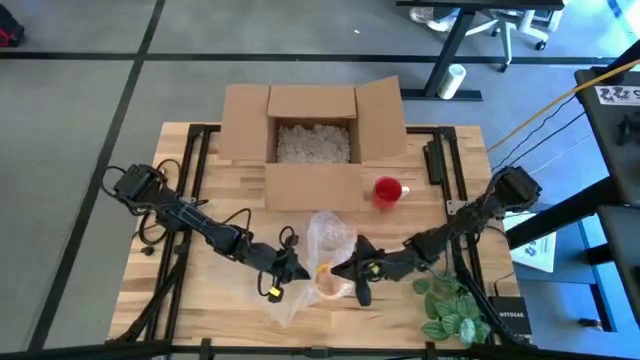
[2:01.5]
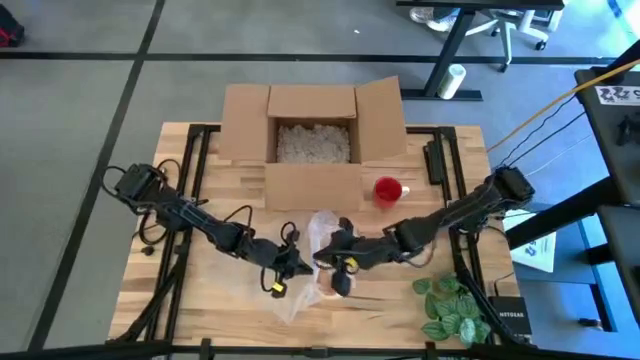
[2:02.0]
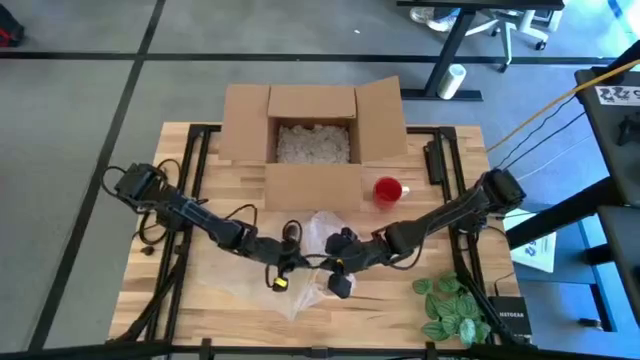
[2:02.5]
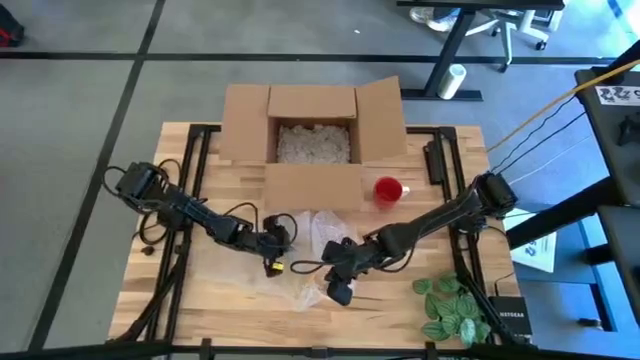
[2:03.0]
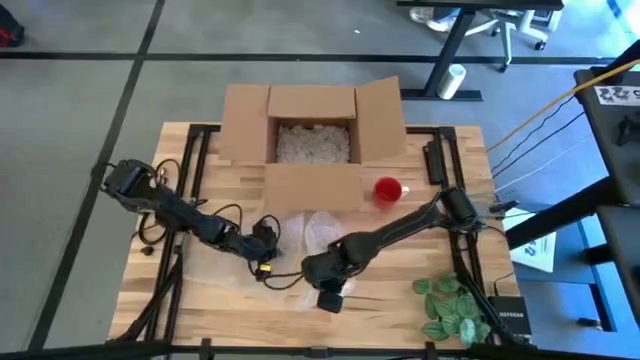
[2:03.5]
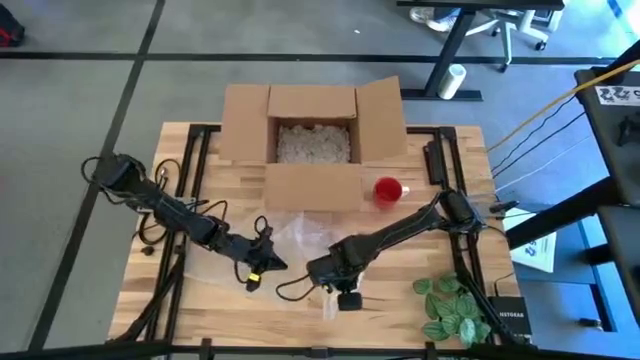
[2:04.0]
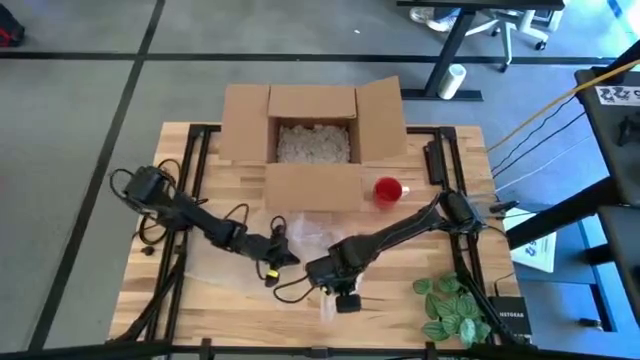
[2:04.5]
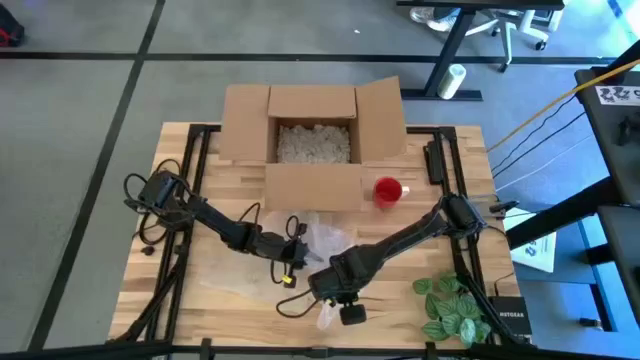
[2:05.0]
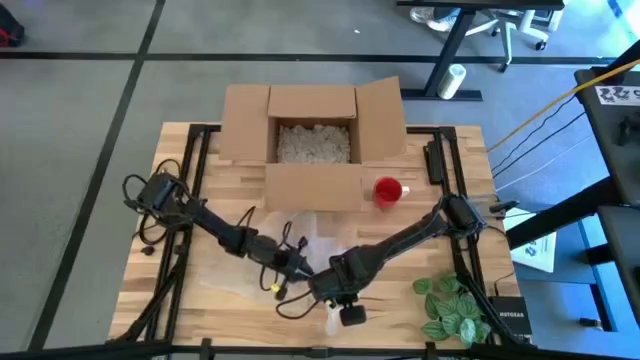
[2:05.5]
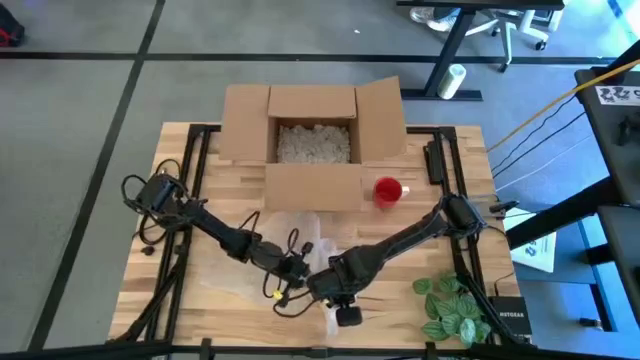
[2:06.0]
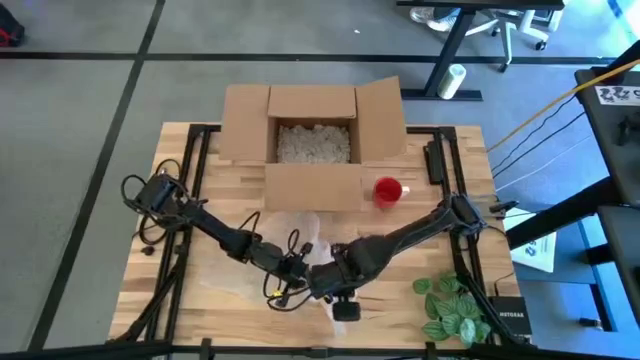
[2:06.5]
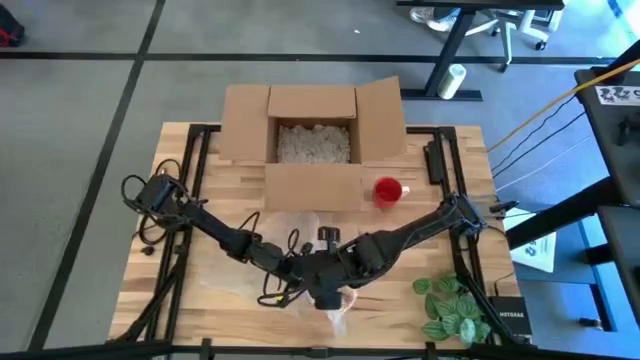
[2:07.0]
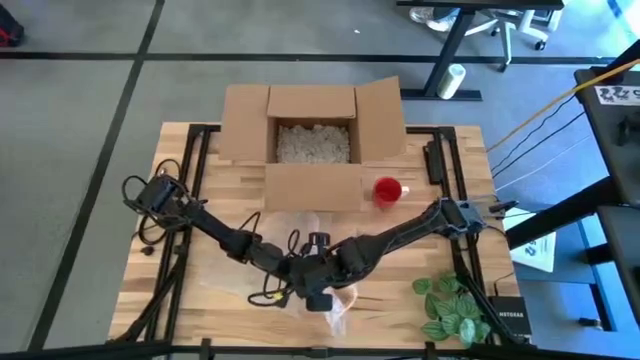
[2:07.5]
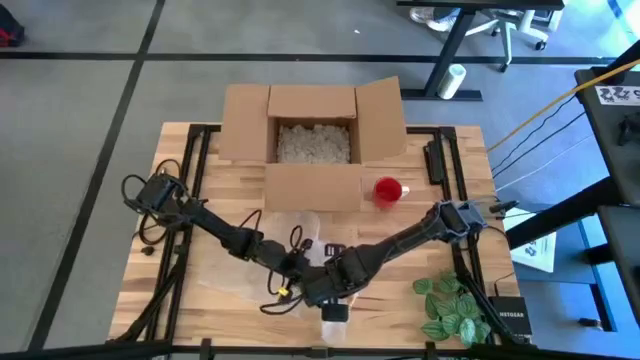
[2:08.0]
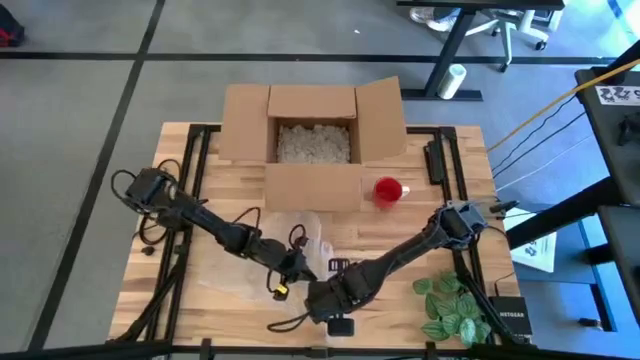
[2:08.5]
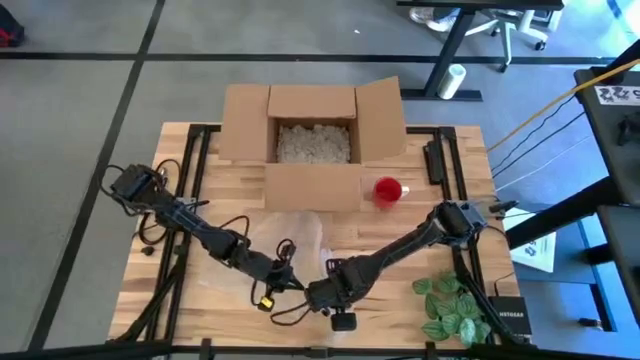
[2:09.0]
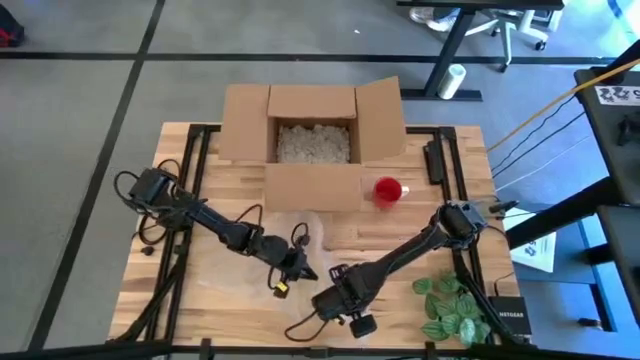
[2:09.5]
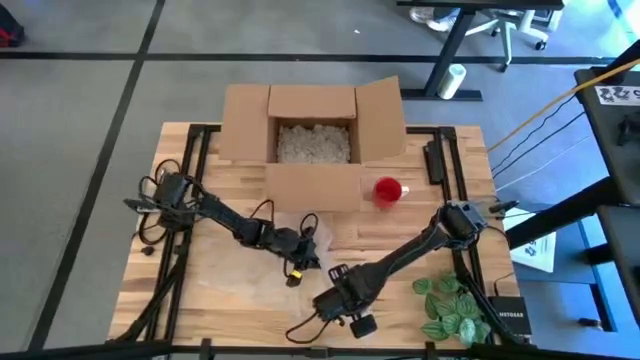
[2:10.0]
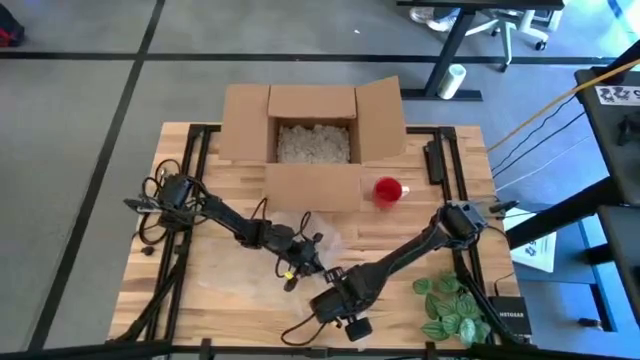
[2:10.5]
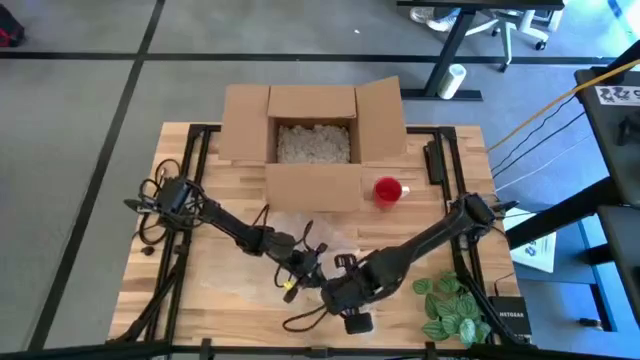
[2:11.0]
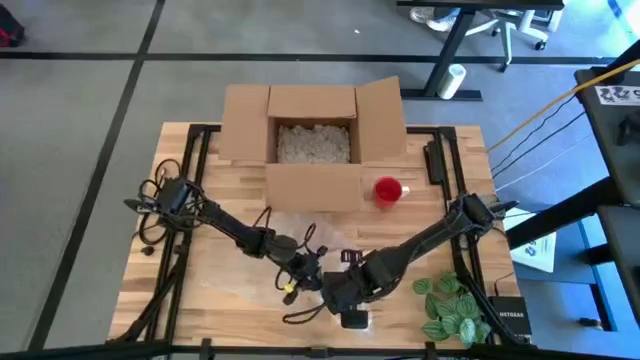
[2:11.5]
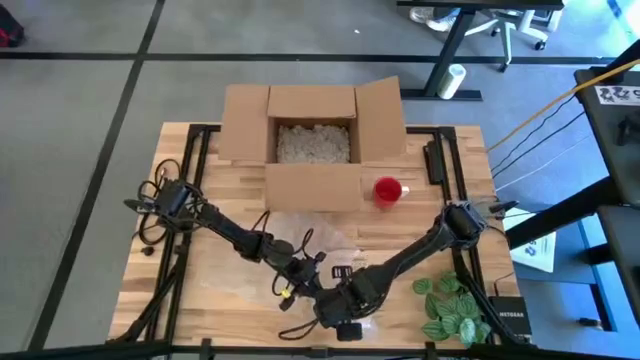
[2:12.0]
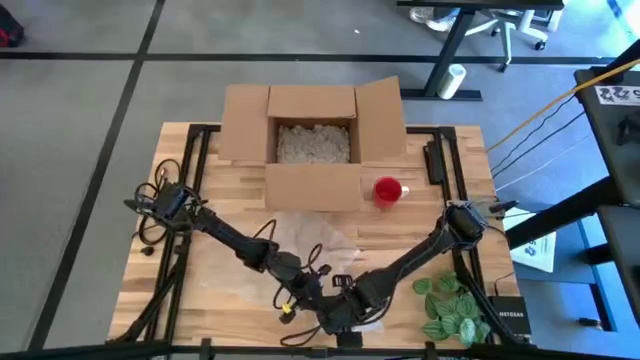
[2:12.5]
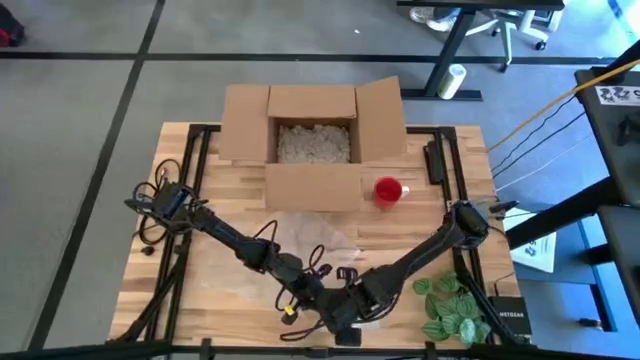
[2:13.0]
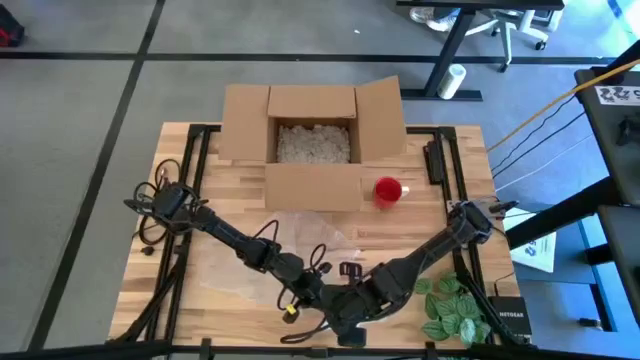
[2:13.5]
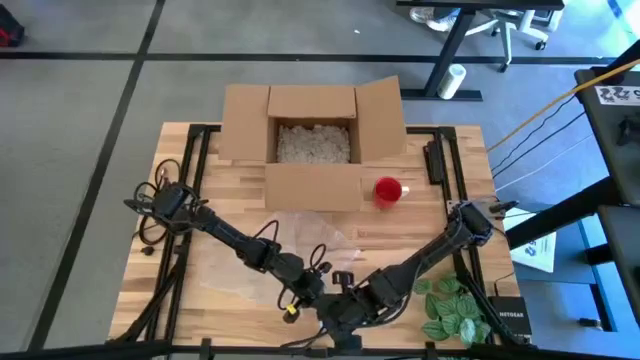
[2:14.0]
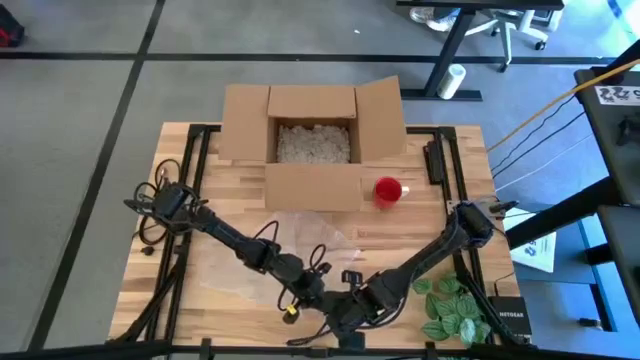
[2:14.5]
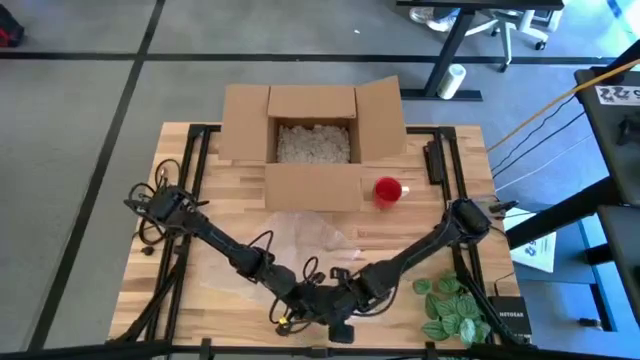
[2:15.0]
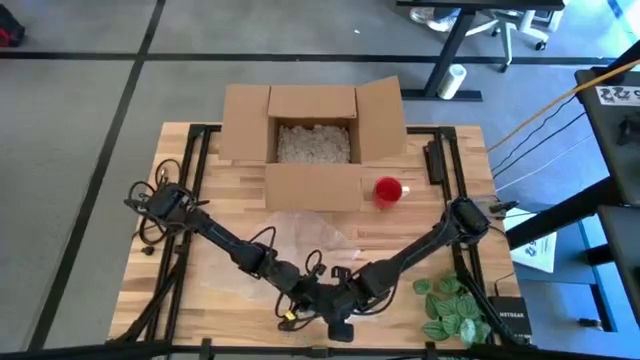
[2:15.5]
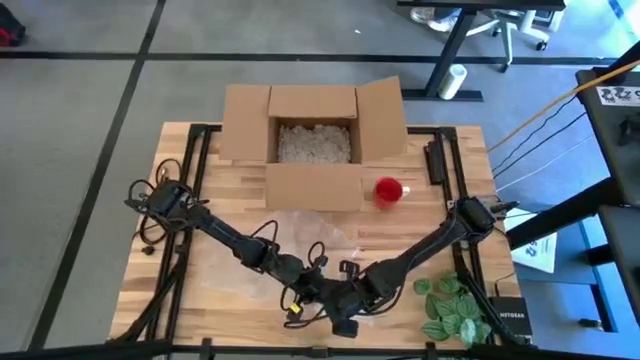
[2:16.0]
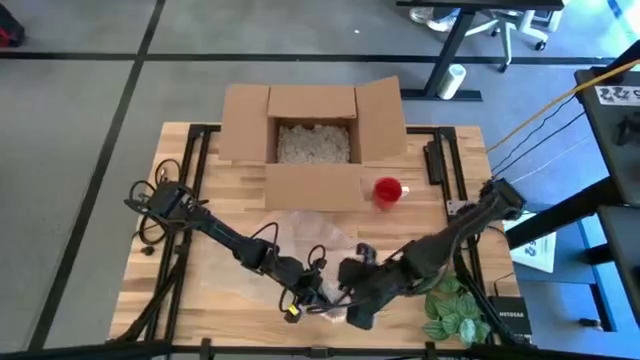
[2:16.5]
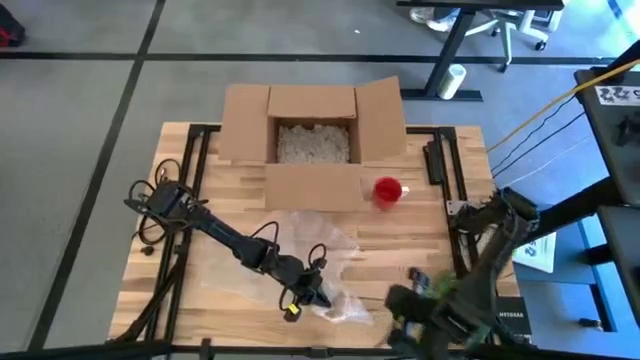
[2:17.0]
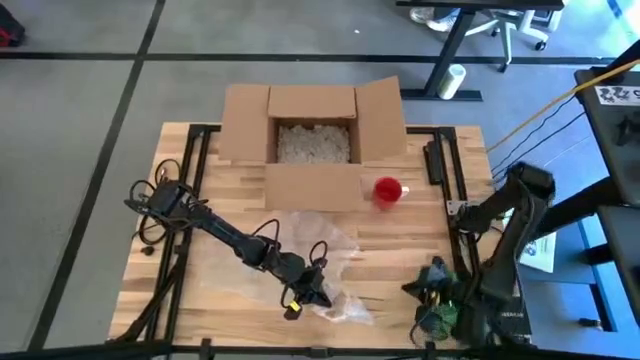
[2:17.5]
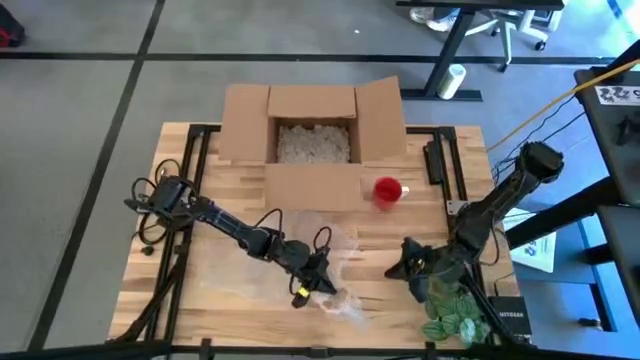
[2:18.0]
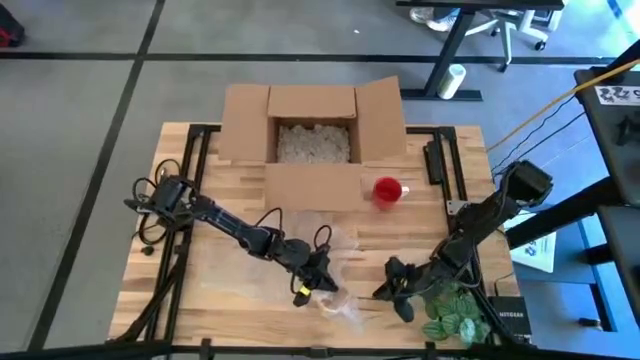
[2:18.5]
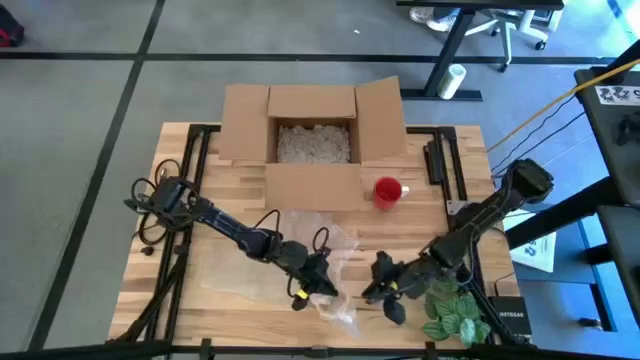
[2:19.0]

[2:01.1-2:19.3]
Task: wrap mug
Wrap the yellow mug using the bubble wrap

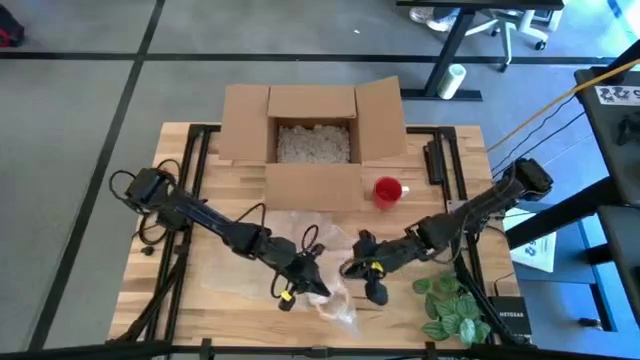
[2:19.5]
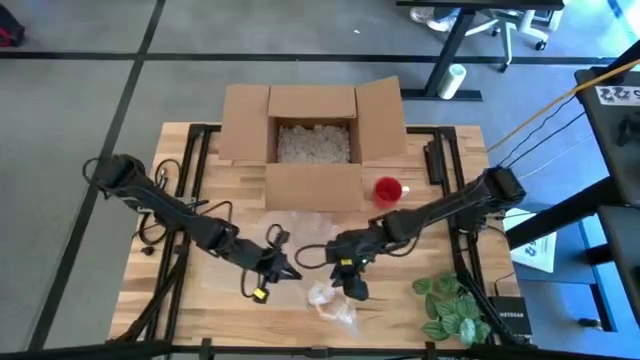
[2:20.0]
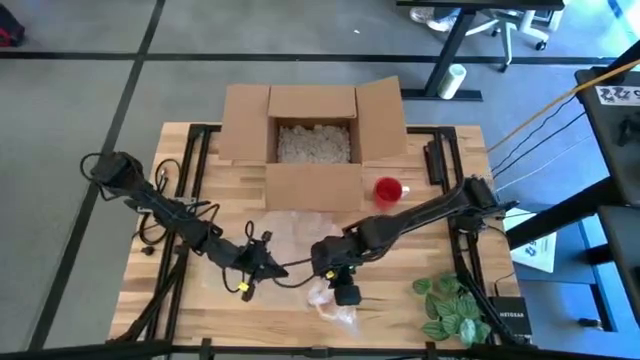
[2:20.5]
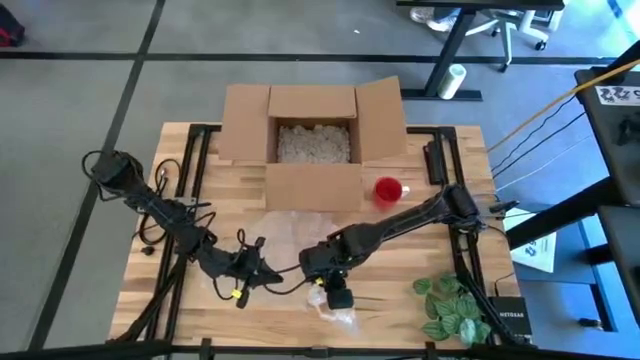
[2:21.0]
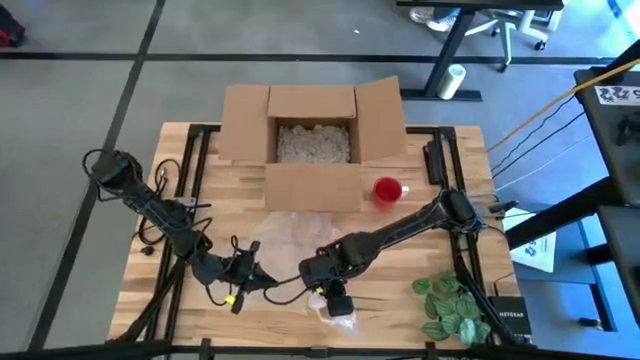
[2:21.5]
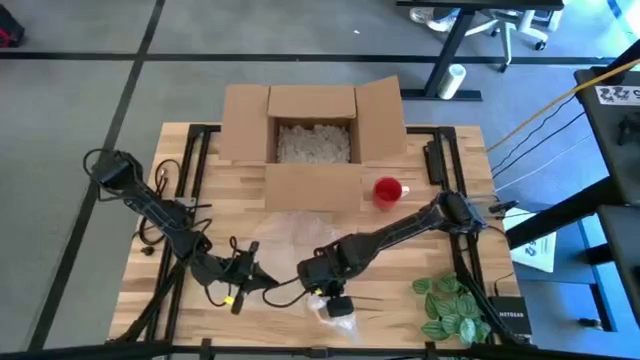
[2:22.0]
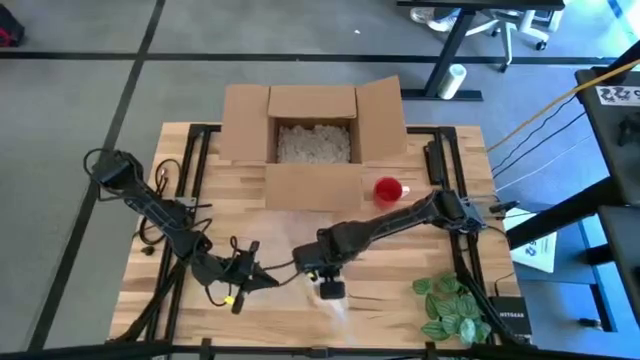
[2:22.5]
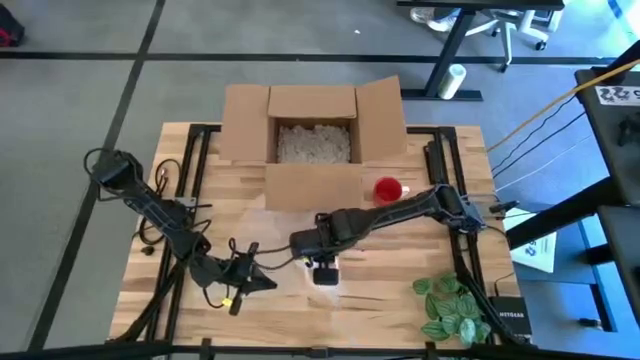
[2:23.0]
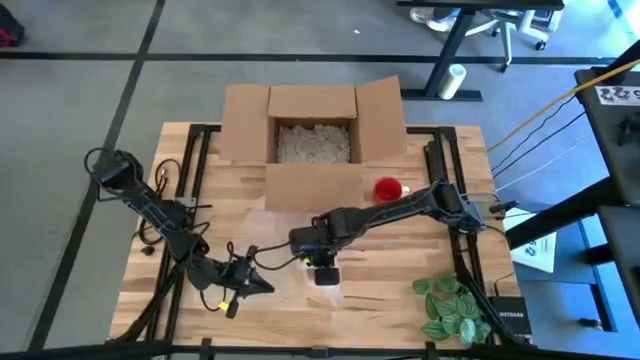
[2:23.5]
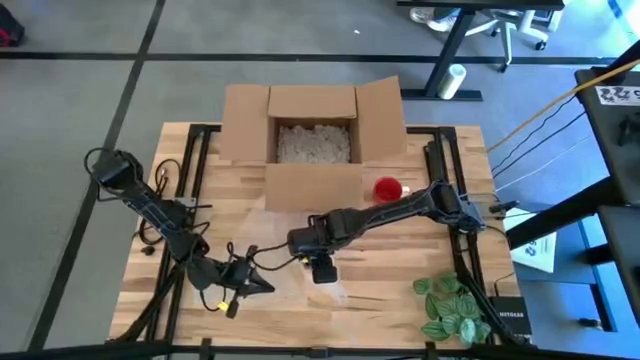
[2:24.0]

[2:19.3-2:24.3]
Put the wrapped yellow mug into the box
